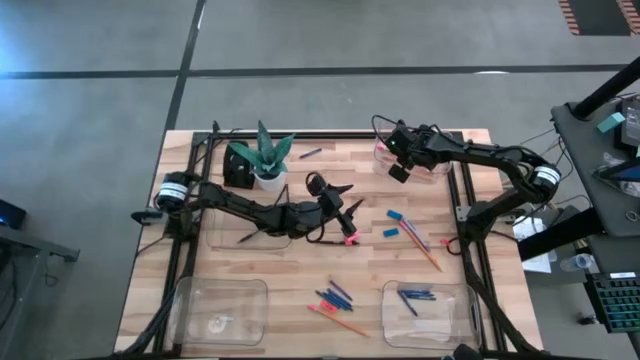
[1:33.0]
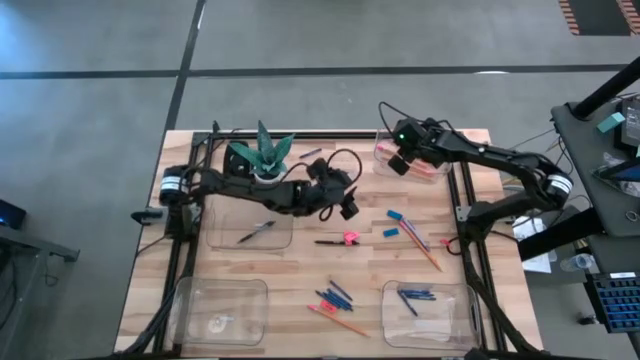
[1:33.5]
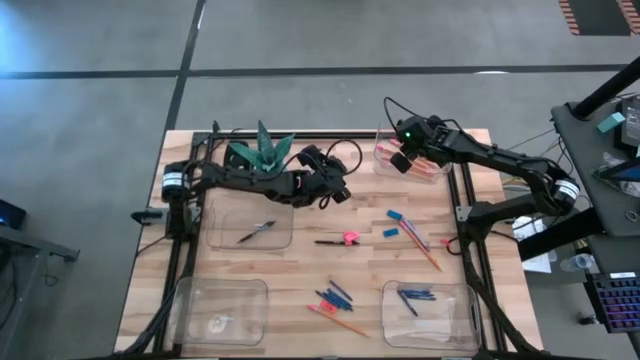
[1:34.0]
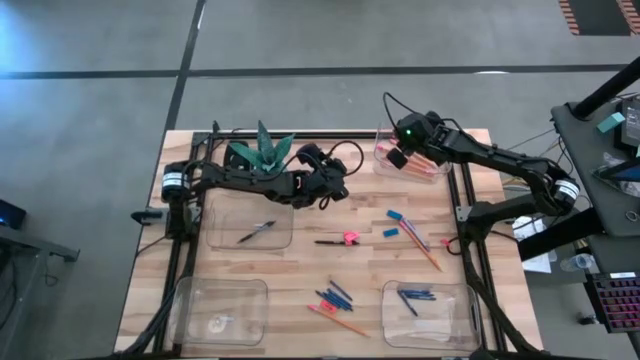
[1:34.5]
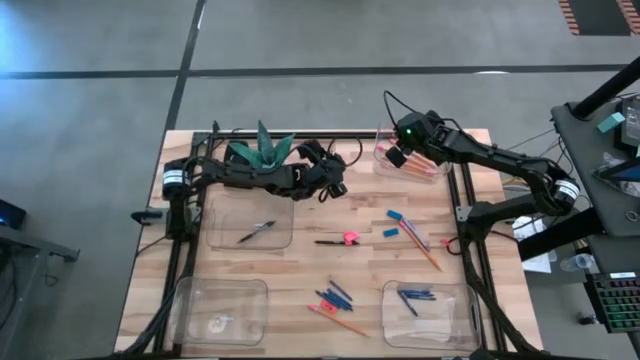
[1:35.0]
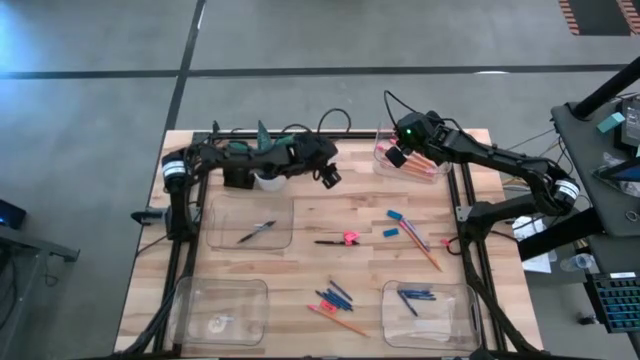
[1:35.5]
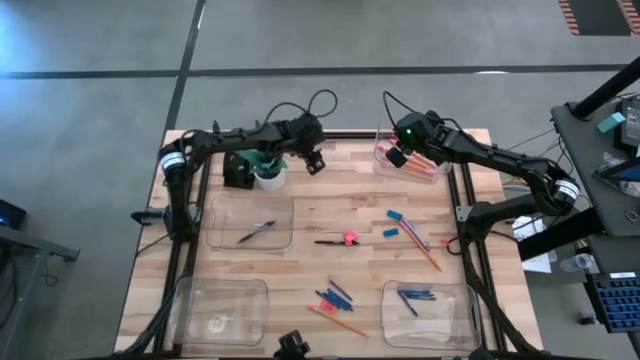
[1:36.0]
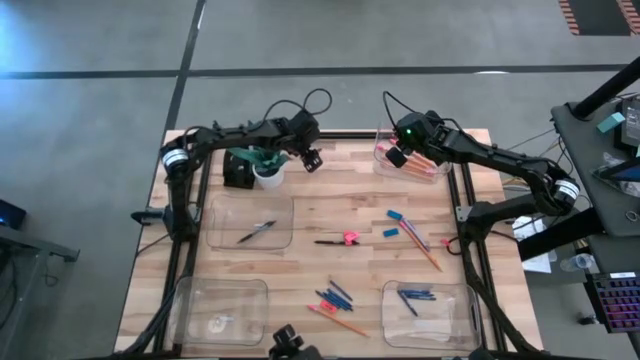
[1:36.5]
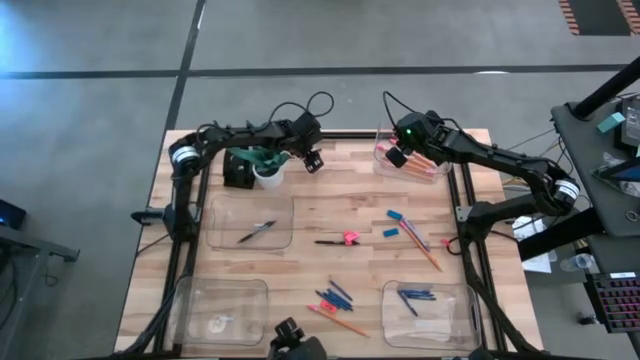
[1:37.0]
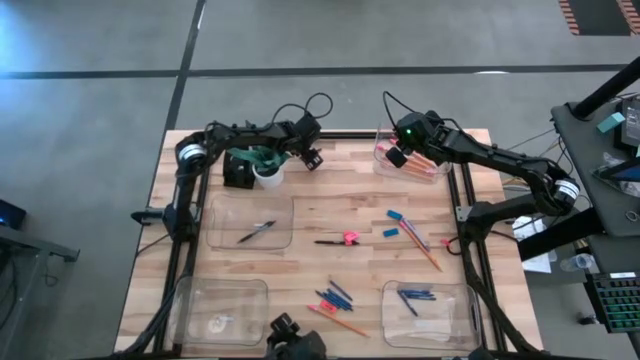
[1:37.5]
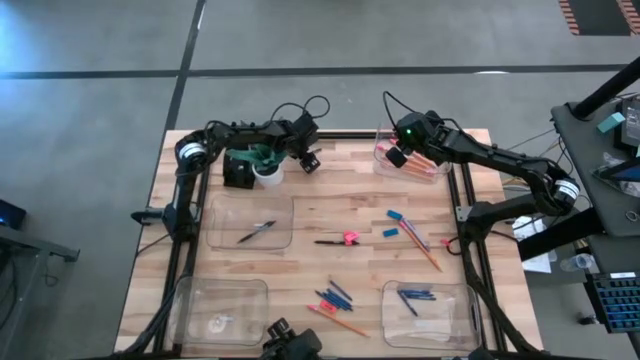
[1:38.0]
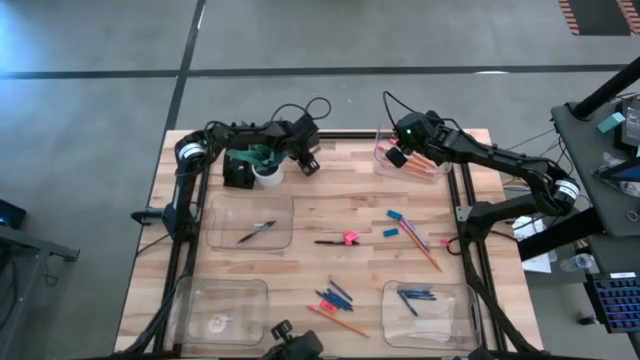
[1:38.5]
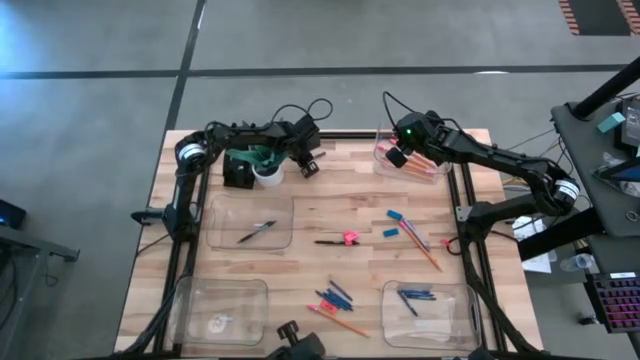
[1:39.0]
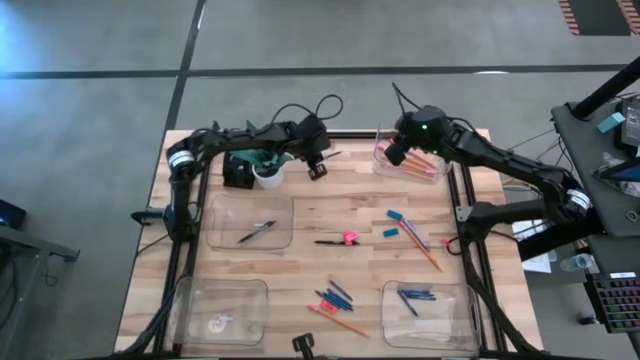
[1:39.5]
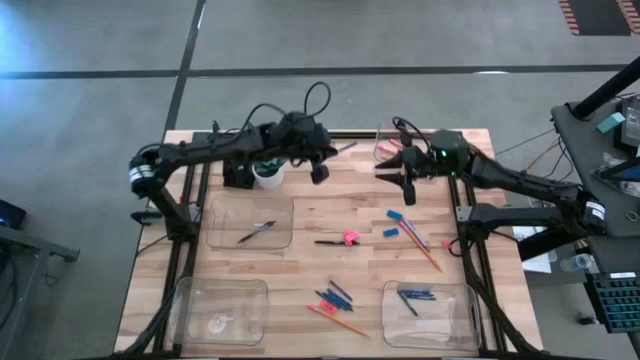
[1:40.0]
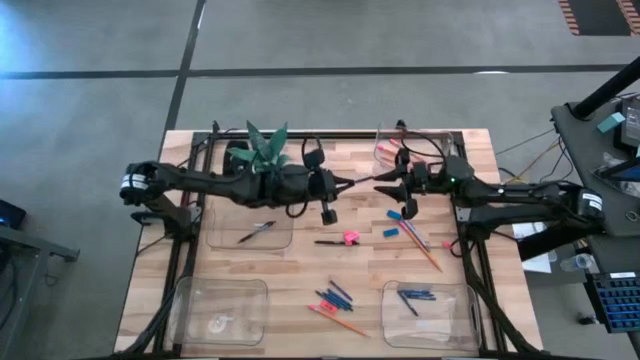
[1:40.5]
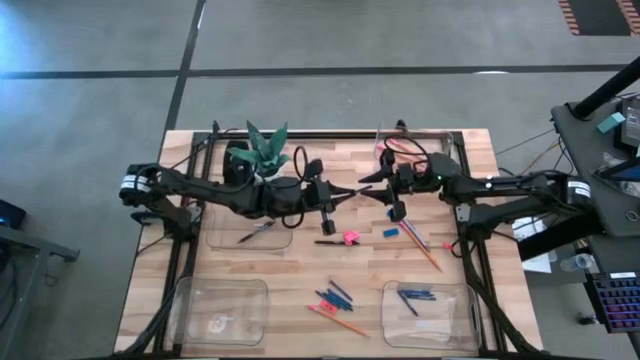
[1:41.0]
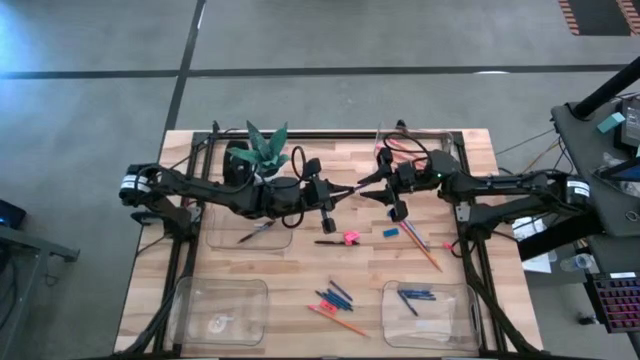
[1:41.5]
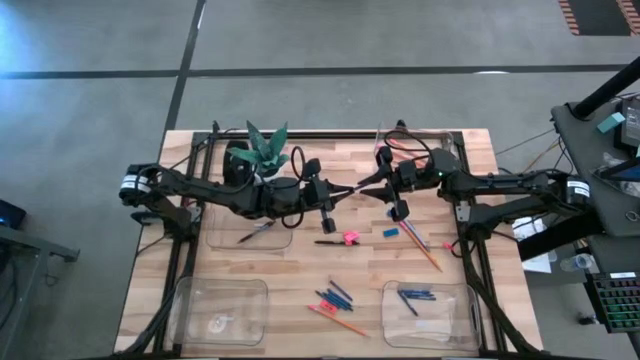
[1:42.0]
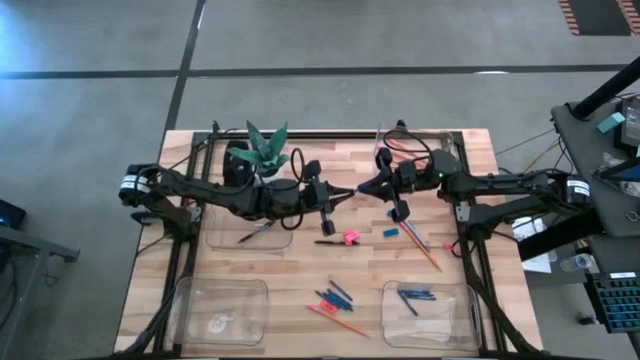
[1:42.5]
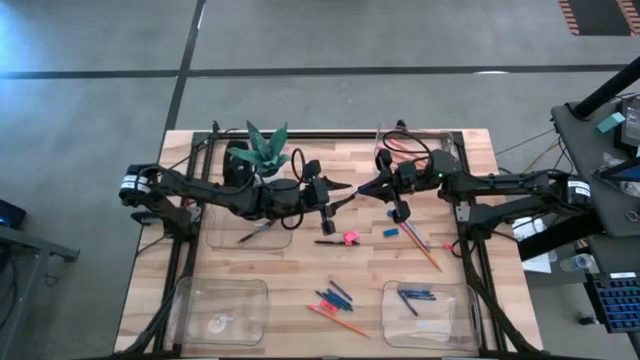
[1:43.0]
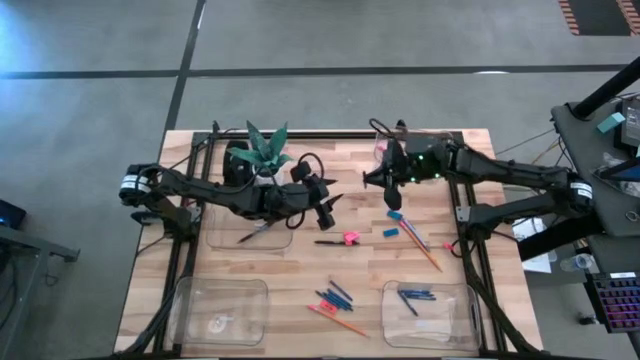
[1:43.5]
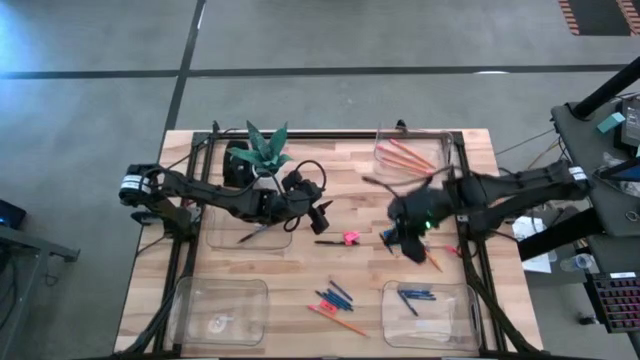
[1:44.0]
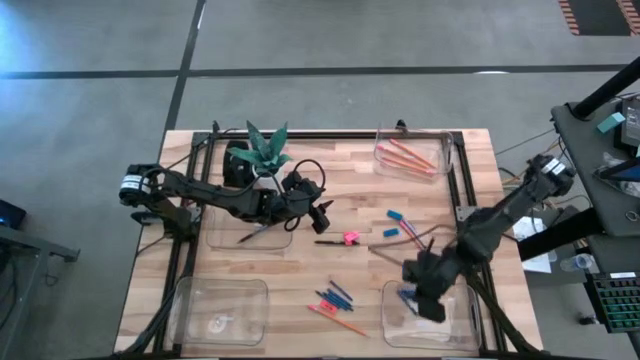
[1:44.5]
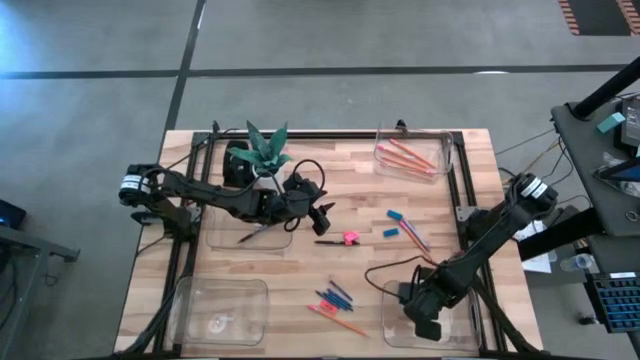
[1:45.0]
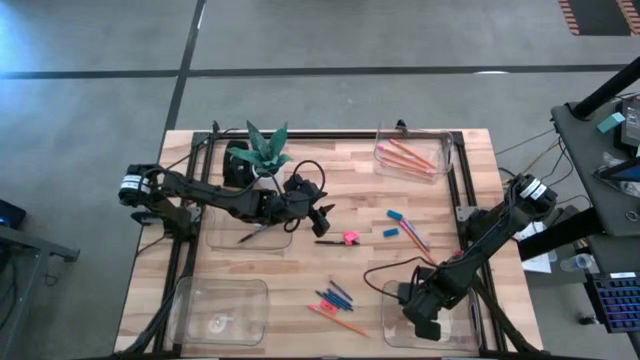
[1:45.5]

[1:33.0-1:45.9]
Task: Sort crayons/erasers/pens/pencils in bins
Put the blue crayon into the bottom right transparent bin

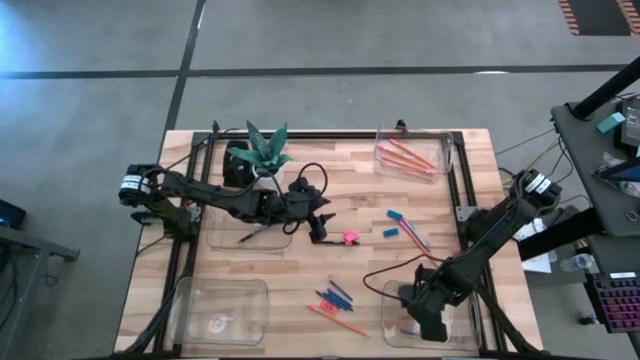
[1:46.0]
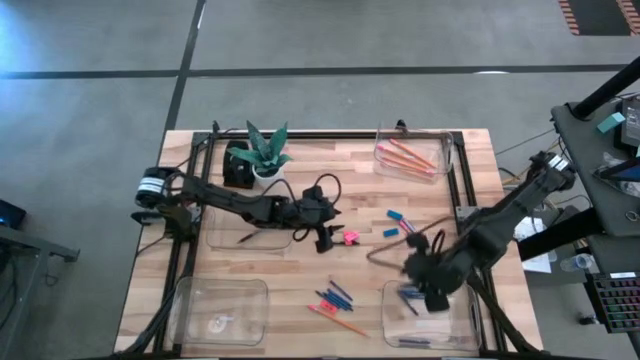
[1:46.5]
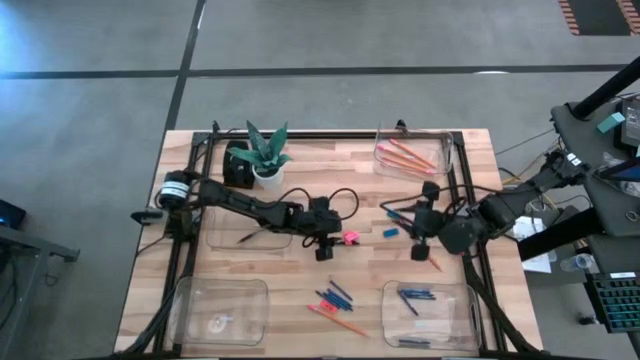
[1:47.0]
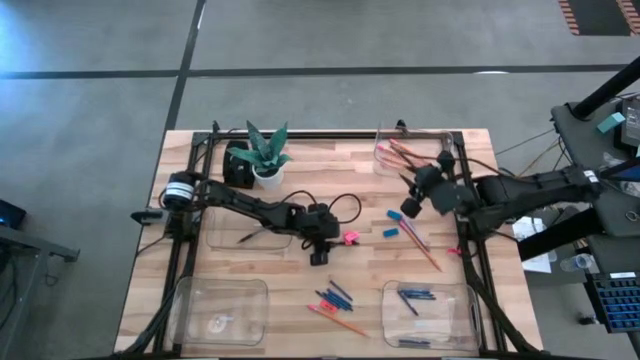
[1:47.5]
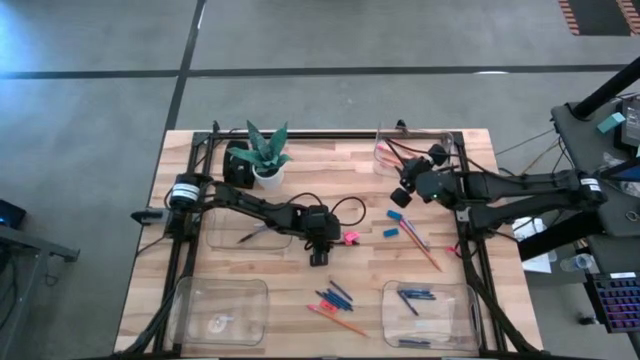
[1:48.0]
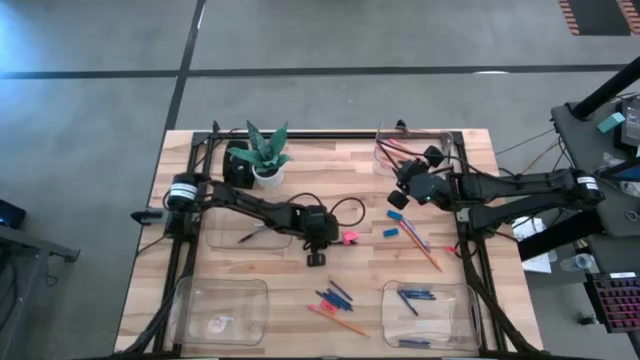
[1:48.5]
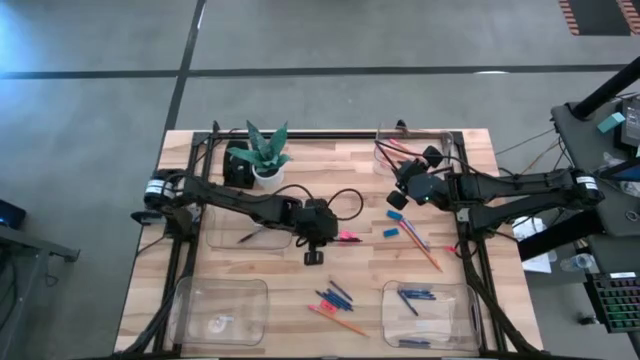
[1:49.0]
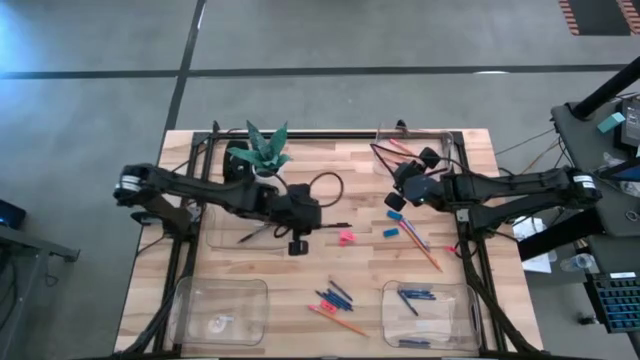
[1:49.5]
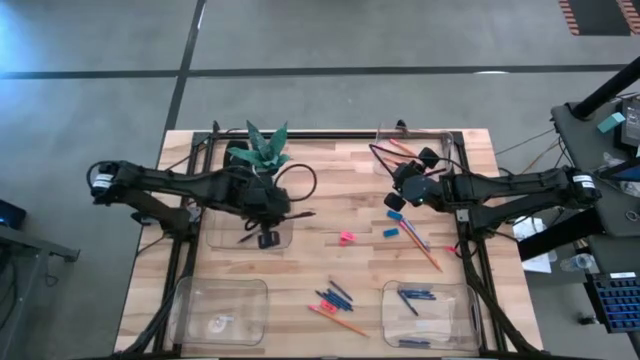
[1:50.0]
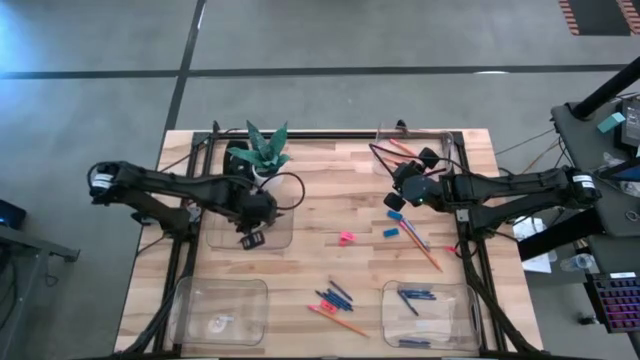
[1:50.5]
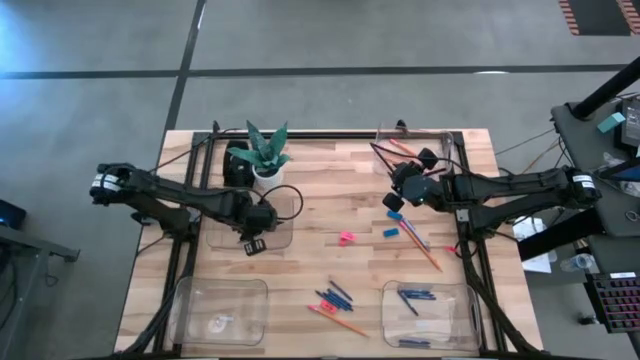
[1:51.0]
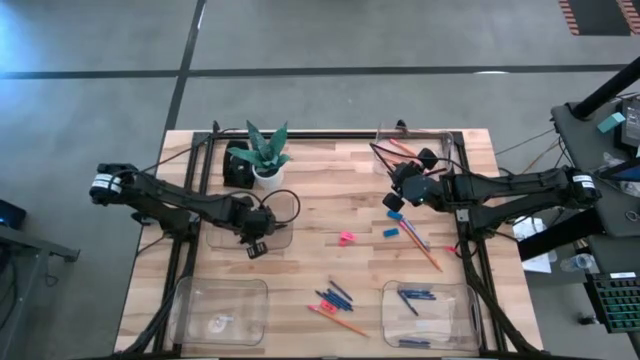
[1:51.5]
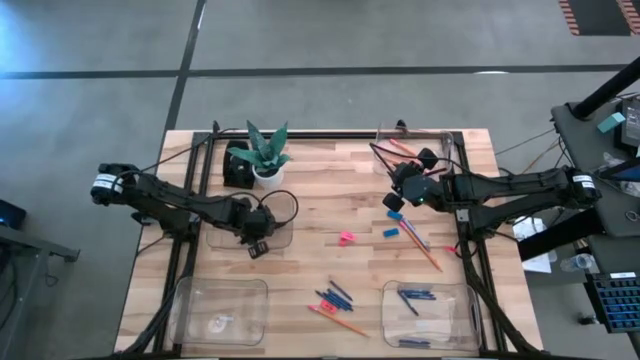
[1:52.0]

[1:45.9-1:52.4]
Put the middle black pen into the middle left transparent bin
